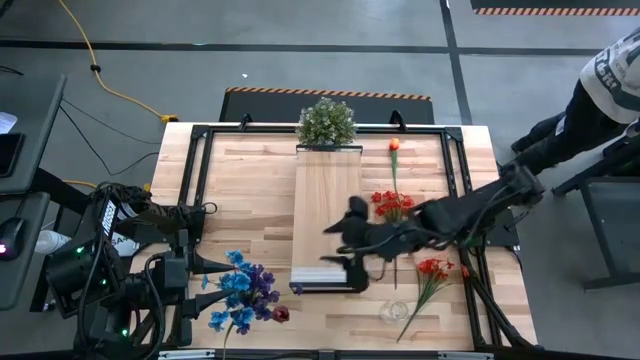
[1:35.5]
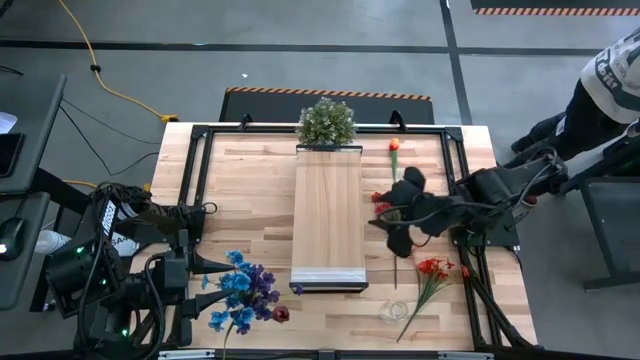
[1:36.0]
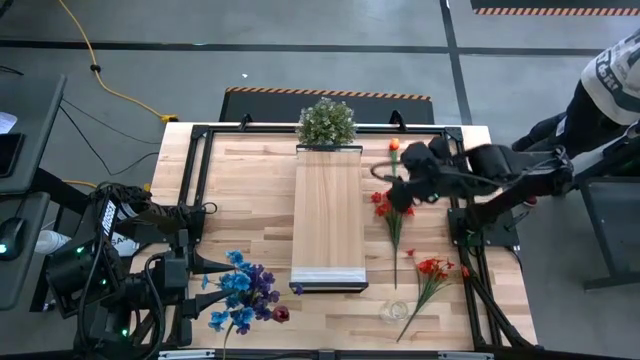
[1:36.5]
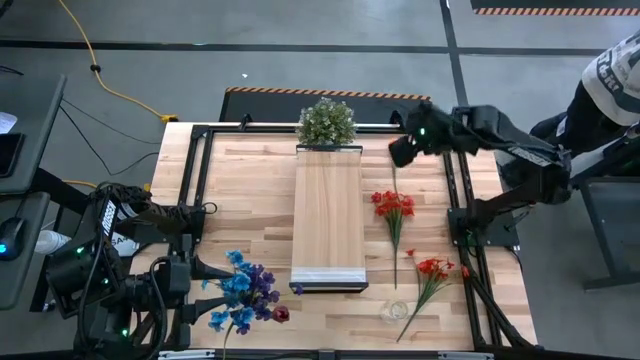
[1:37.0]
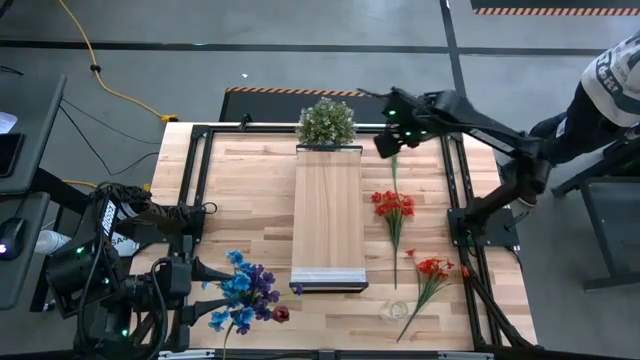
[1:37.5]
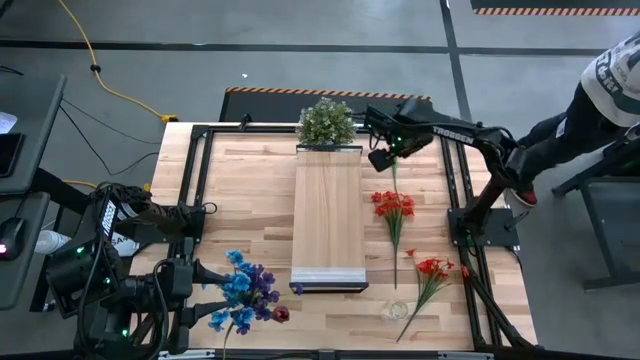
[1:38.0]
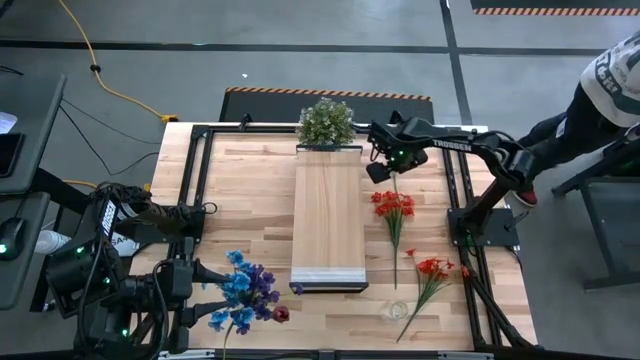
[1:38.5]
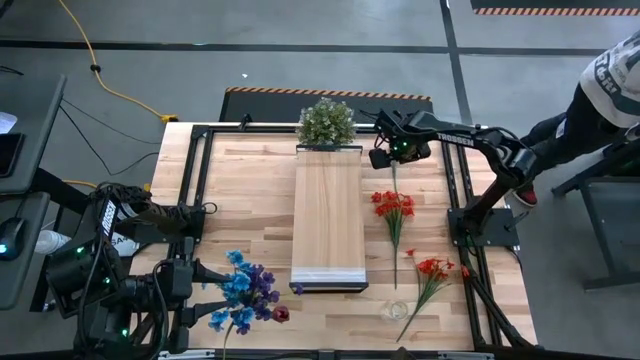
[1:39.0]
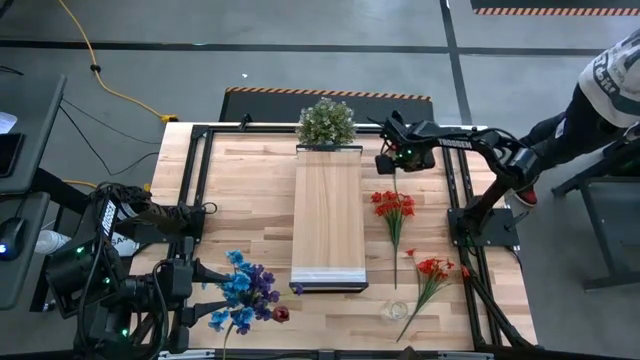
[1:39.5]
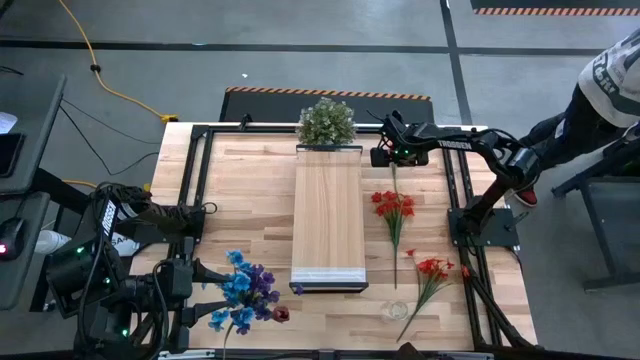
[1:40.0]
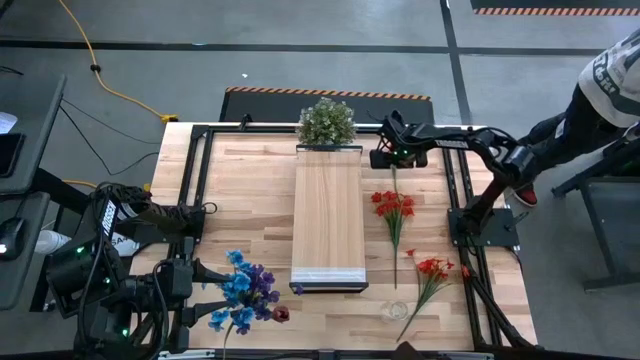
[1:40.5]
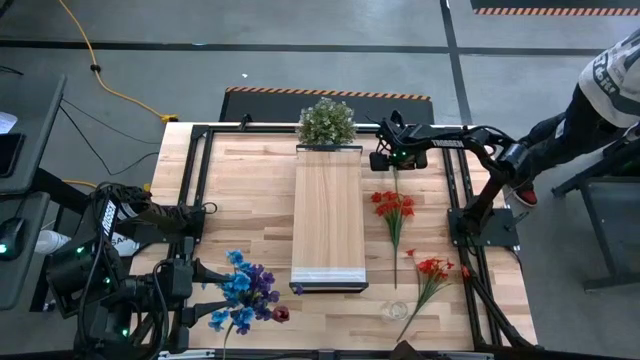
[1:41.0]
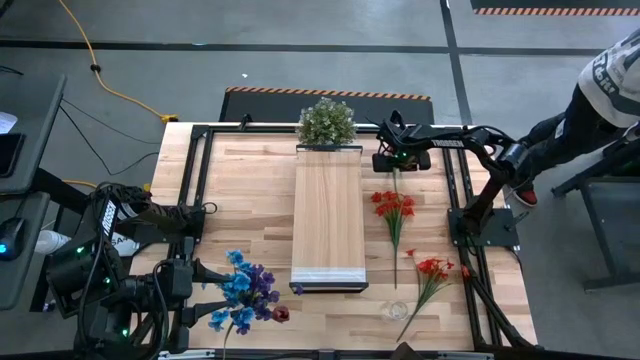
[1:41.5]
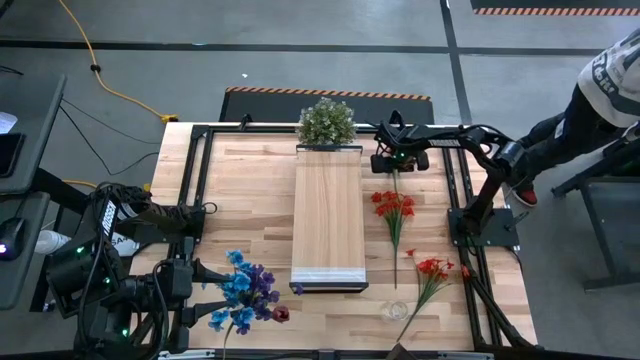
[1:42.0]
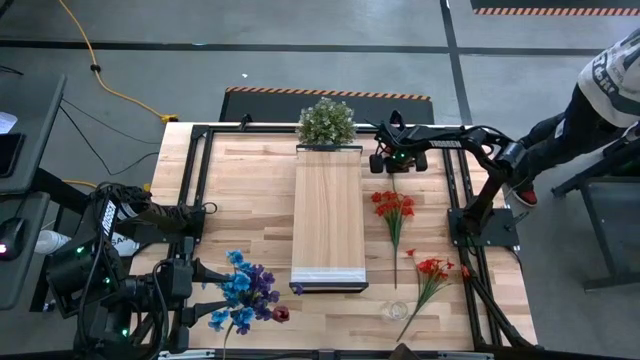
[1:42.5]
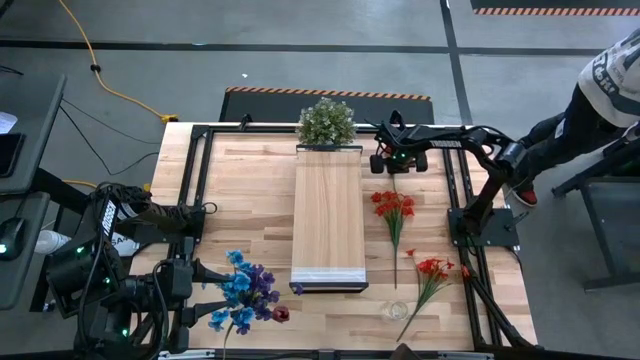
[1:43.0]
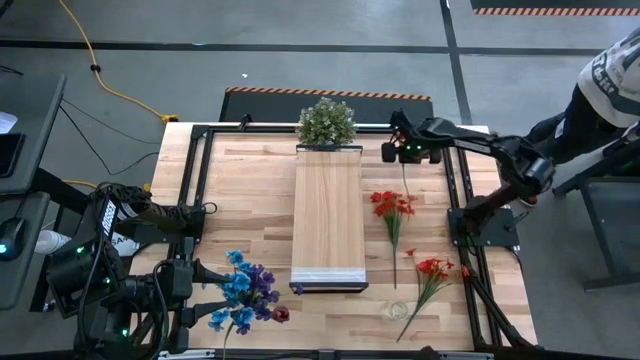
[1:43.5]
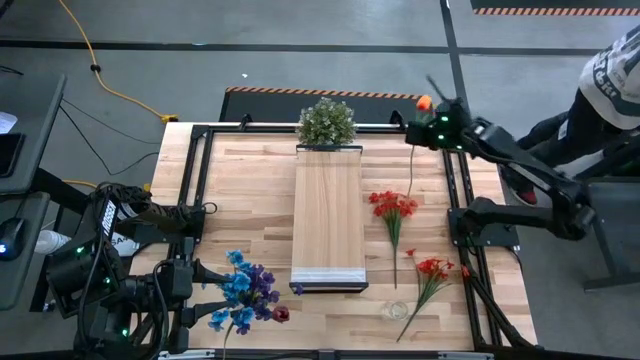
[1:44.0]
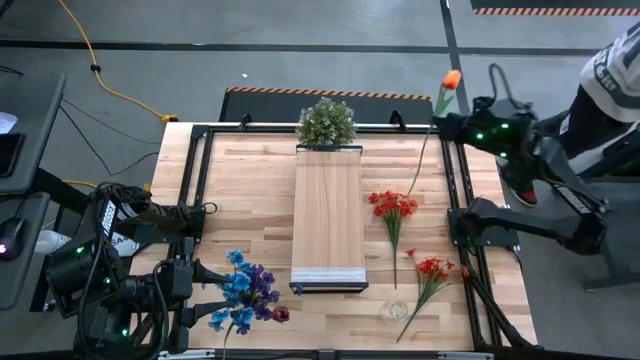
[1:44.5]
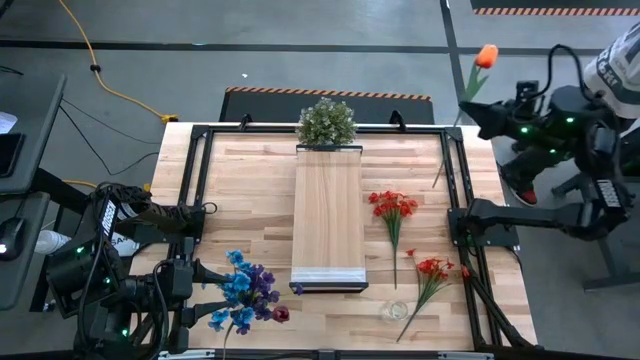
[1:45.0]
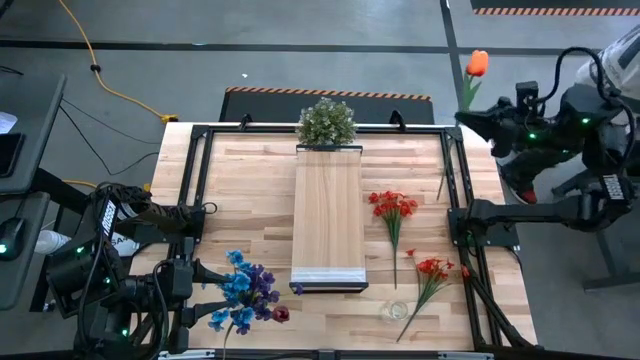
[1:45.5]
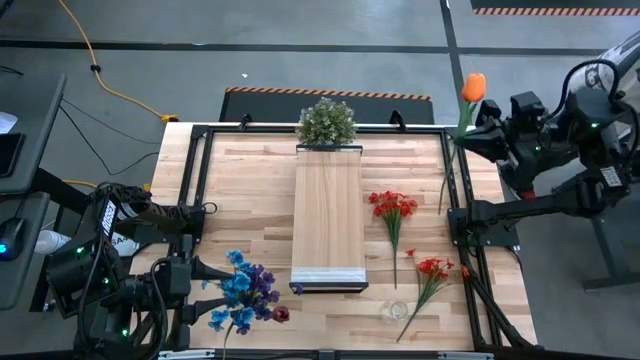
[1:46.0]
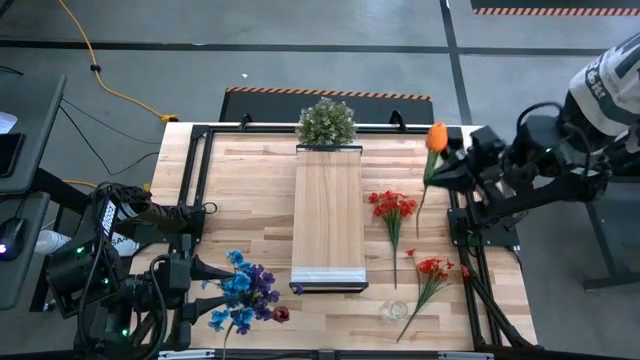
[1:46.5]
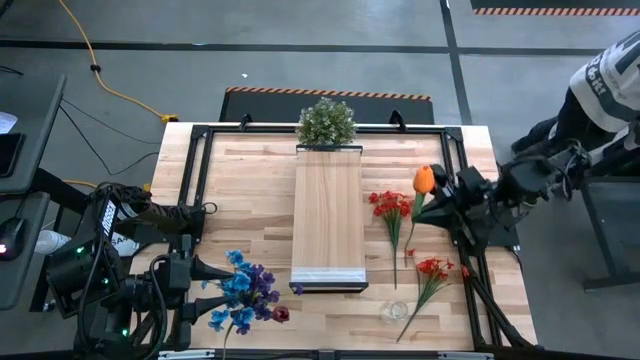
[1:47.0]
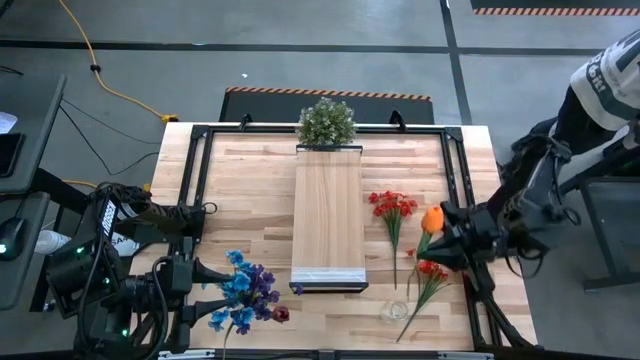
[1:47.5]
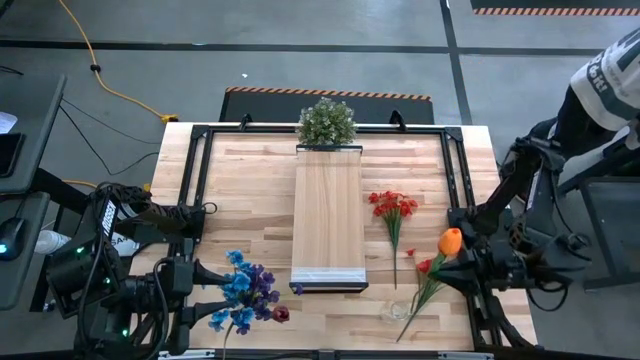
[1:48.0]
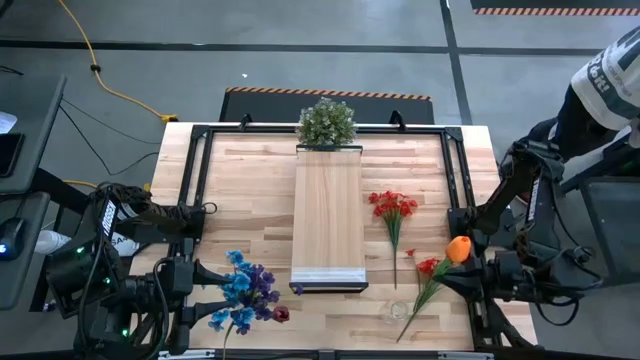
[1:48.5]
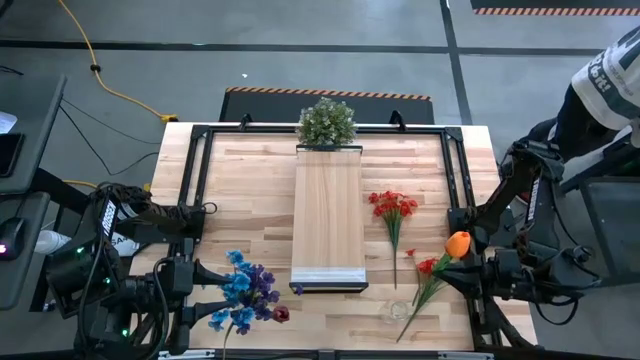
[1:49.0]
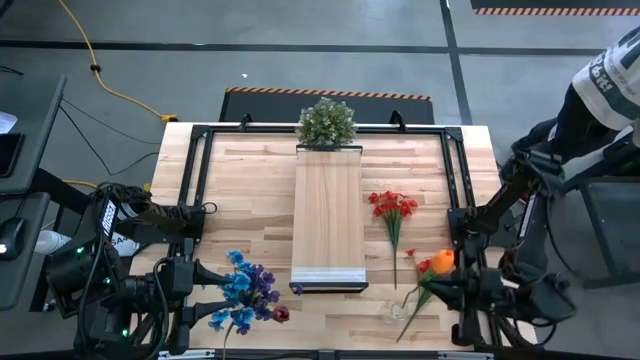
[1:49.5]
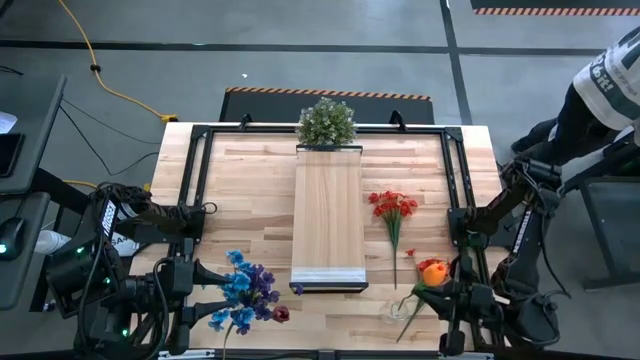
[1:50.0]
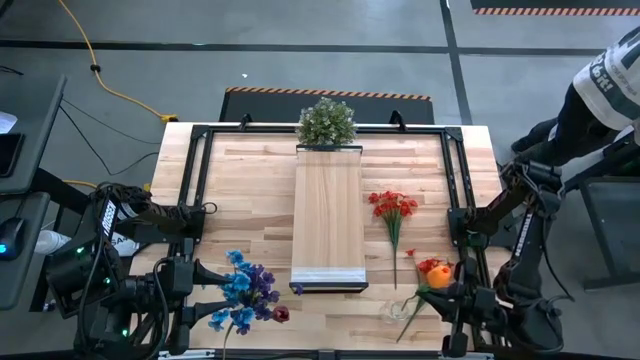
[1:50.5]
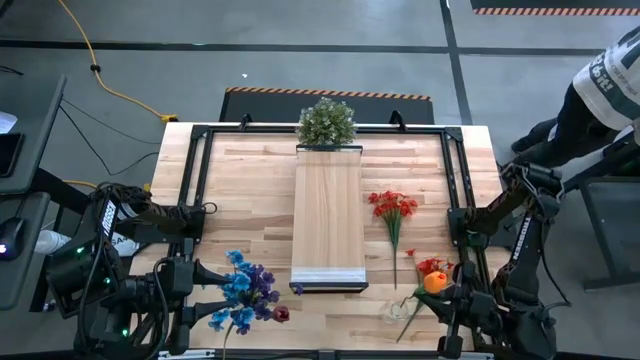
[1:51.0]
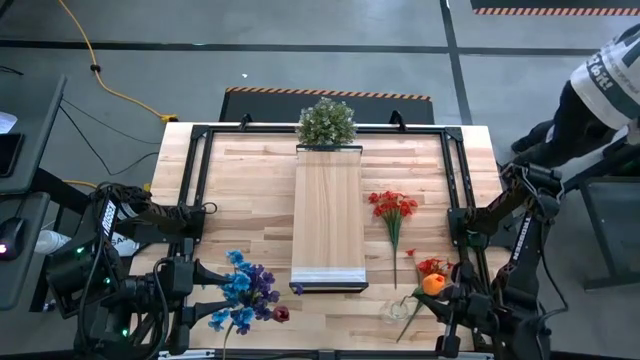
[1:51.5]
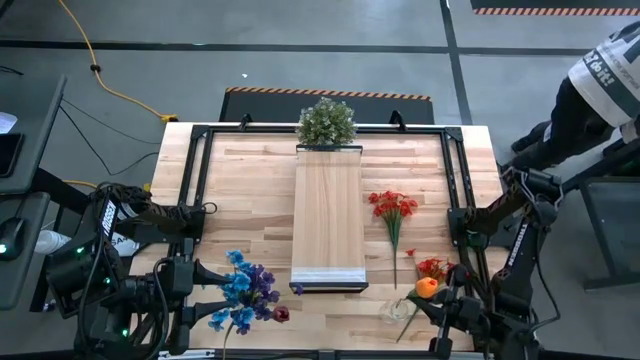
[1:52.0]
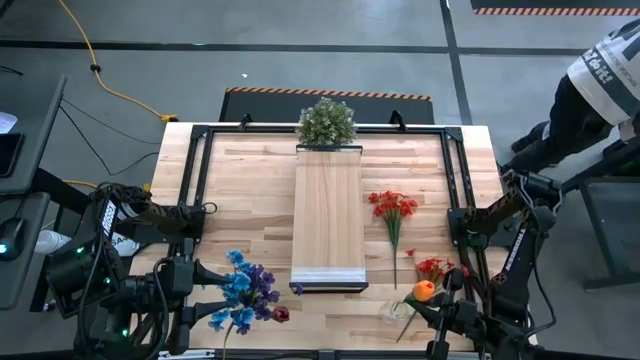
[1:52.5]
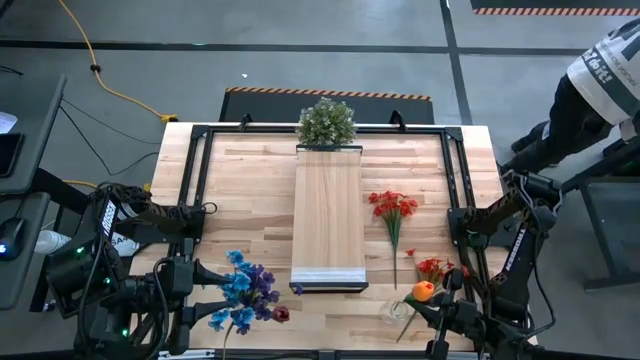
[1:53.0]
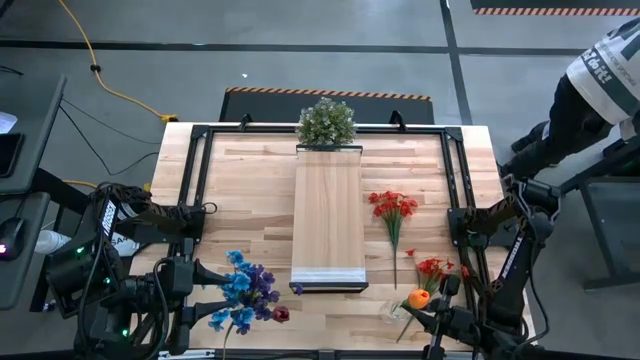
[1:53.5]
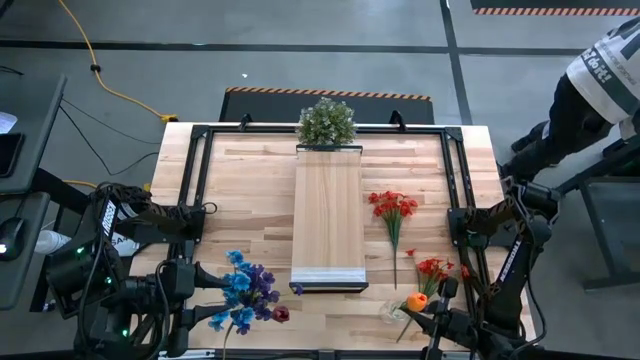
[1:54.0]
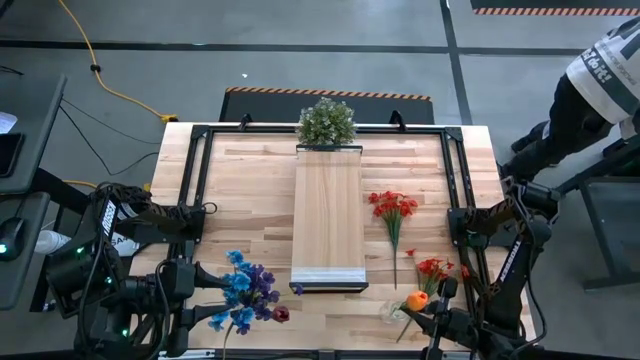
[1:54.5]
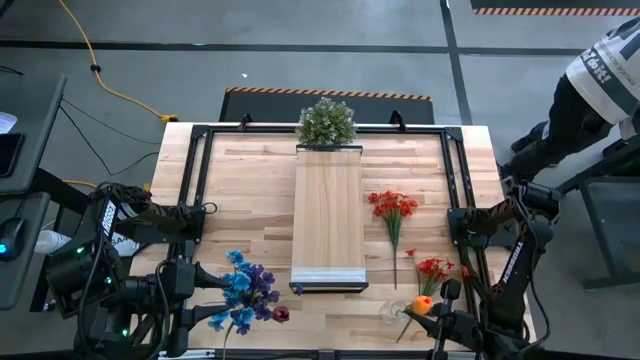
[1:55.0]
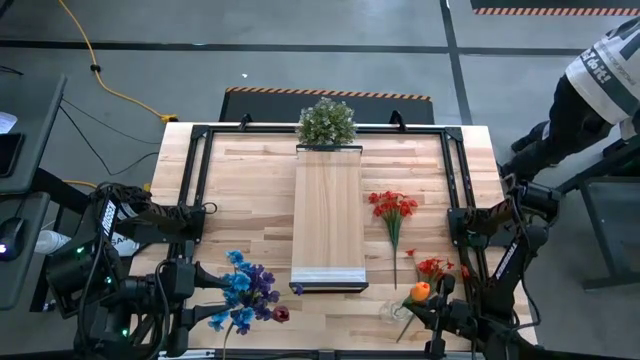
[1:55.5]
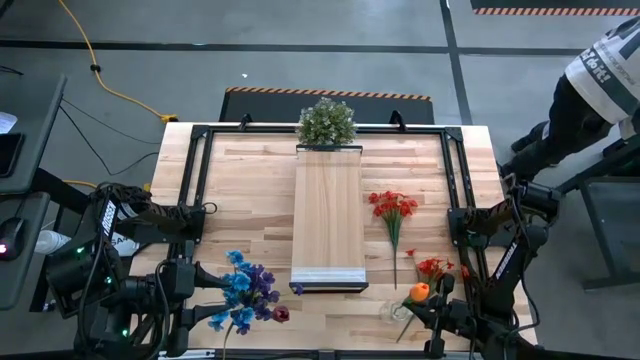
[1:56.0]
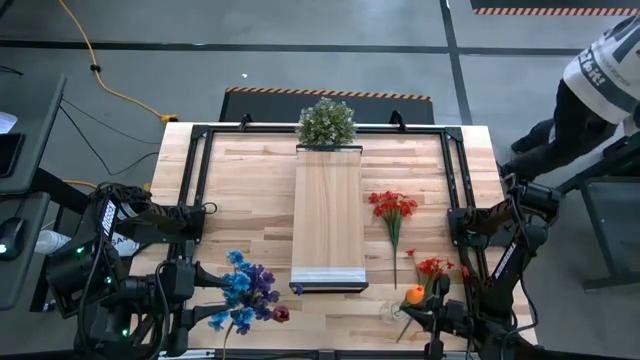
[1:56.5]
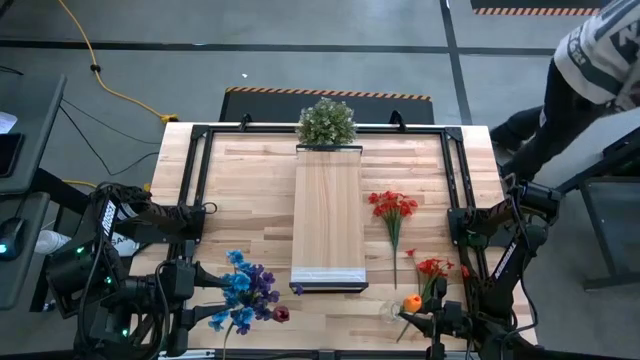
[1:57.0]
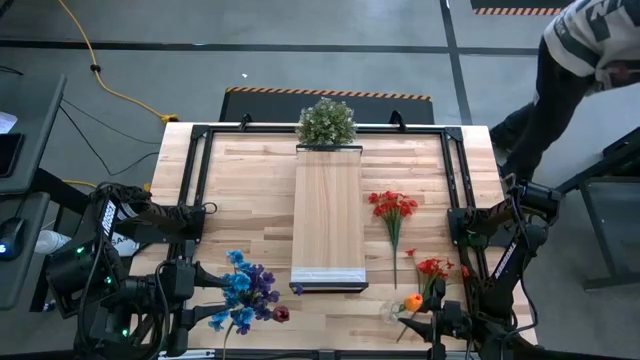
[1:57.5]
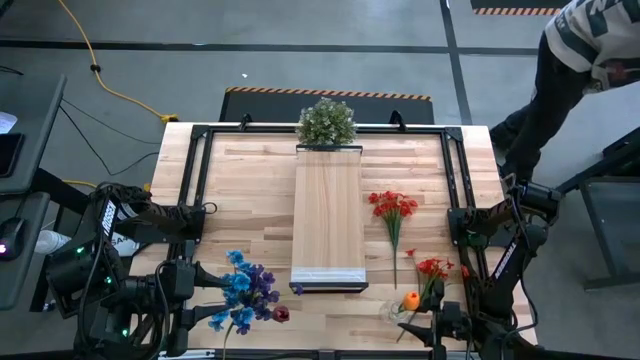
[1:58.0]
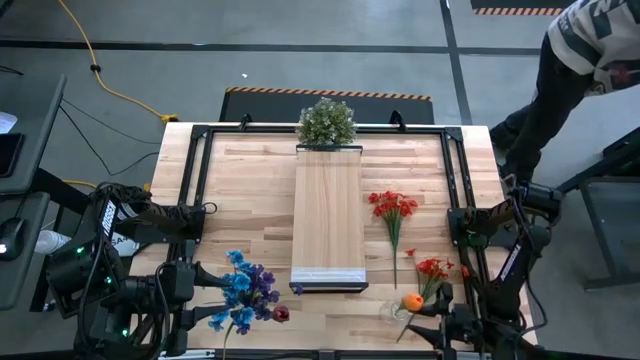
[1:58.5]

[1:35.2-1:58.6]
Task: Pick and place flowers into a vace then onto a shelf
Put the orange tulip into the right transparent vase
